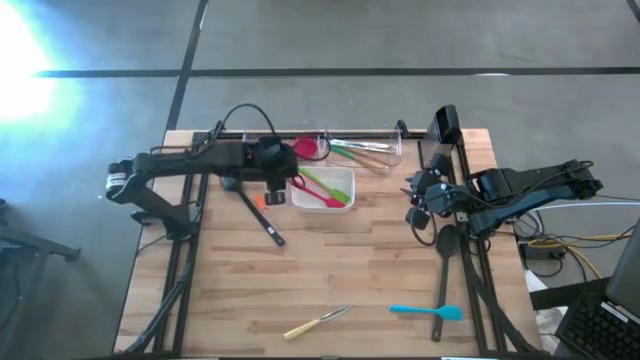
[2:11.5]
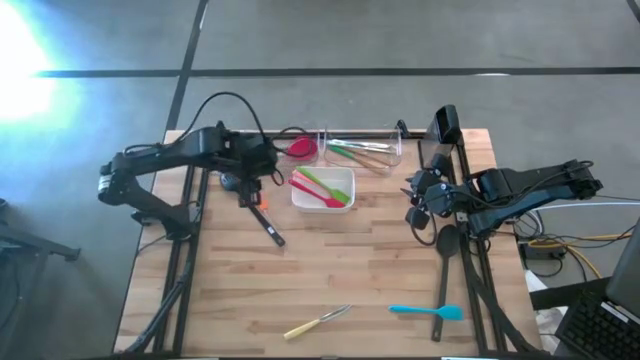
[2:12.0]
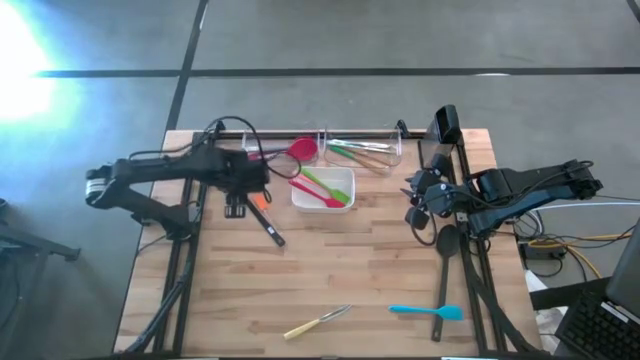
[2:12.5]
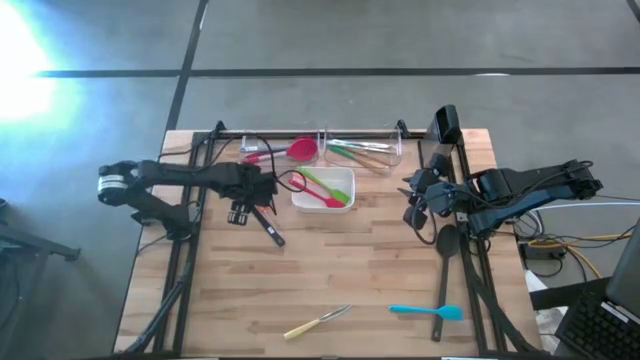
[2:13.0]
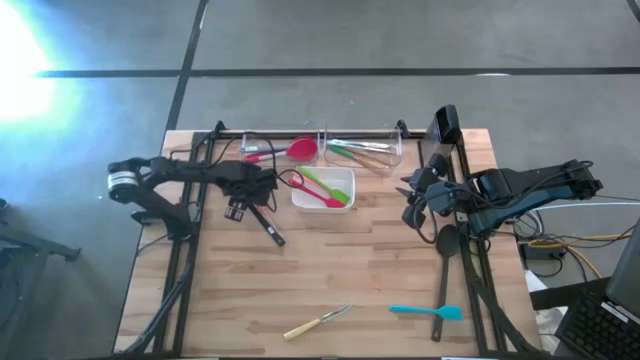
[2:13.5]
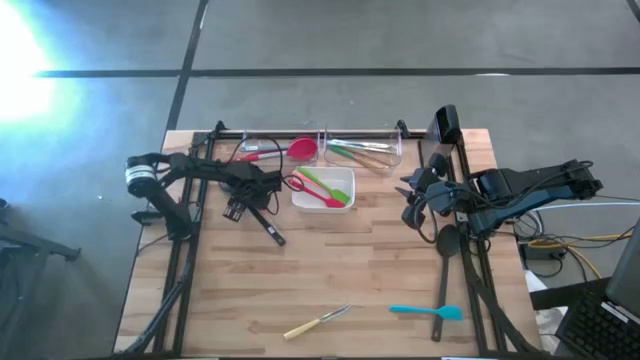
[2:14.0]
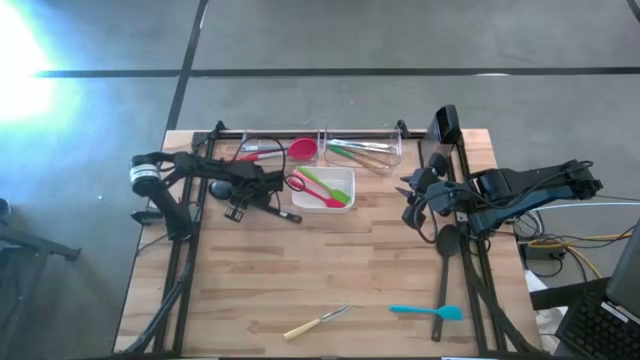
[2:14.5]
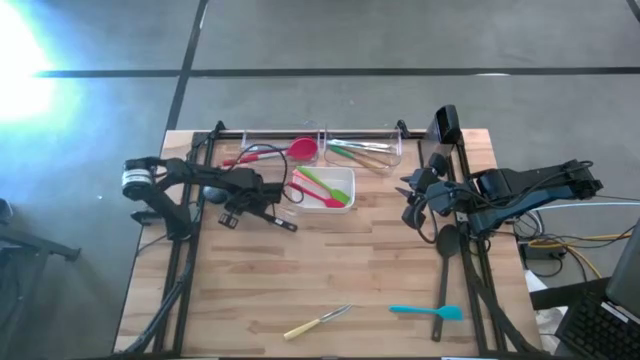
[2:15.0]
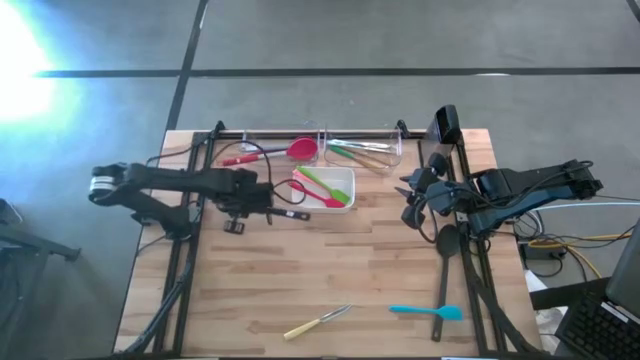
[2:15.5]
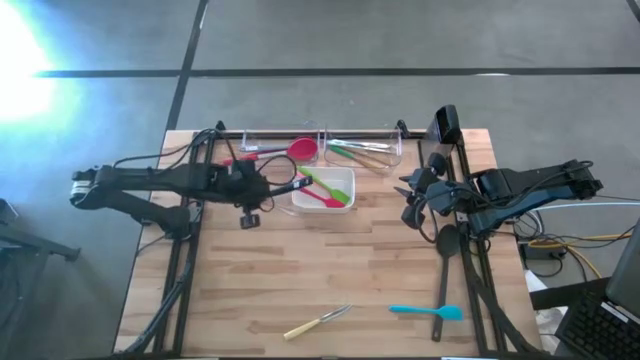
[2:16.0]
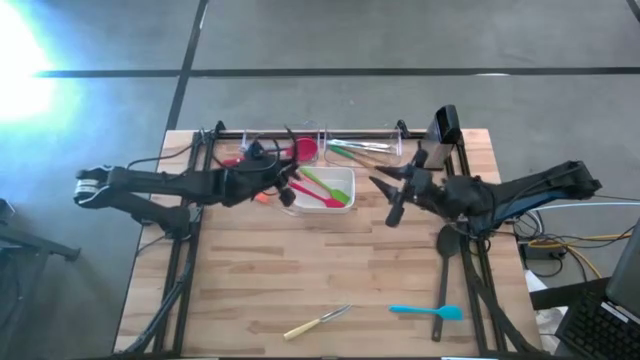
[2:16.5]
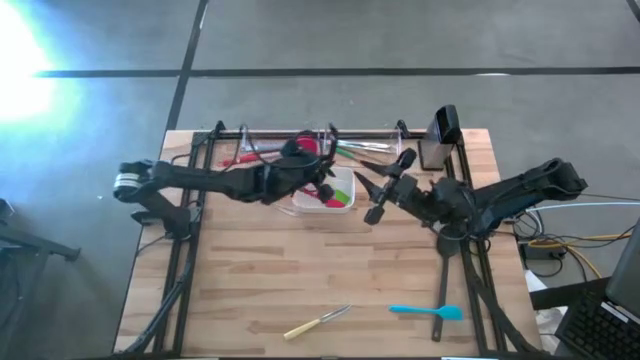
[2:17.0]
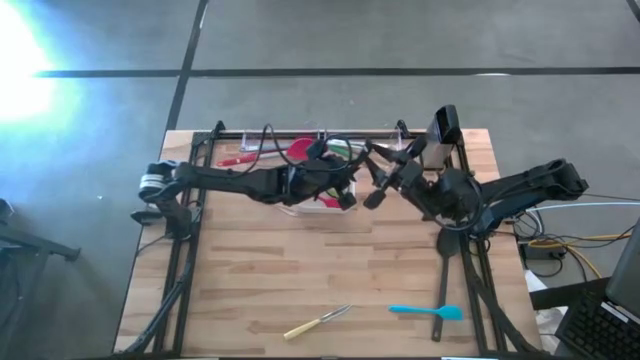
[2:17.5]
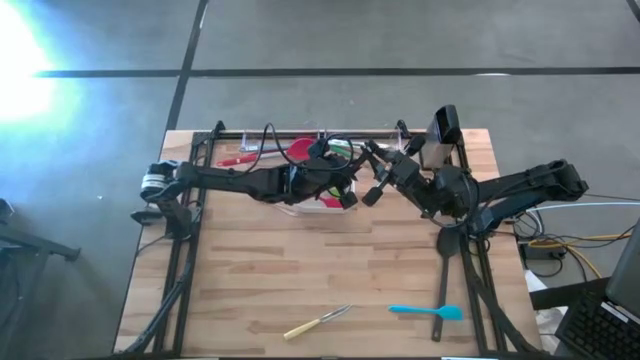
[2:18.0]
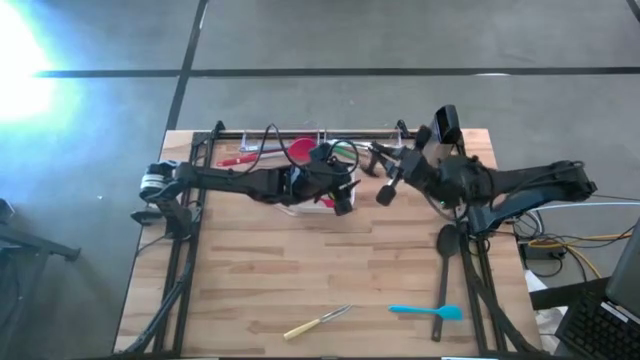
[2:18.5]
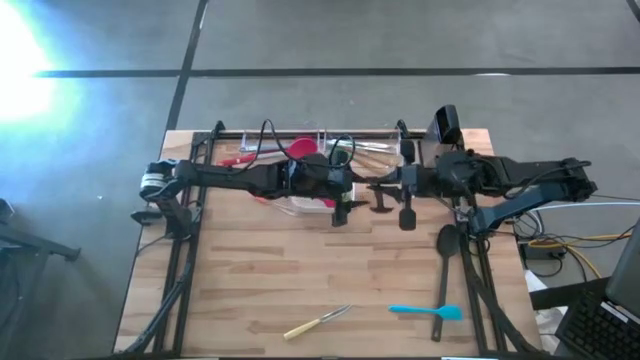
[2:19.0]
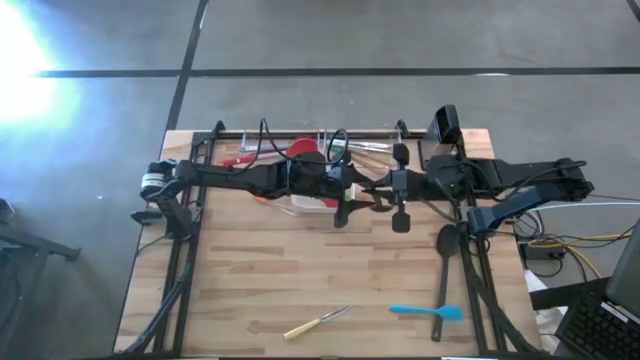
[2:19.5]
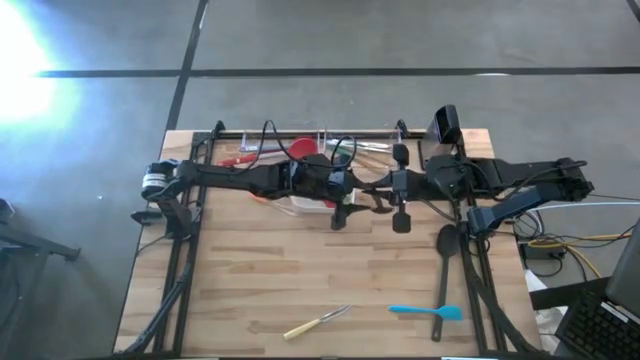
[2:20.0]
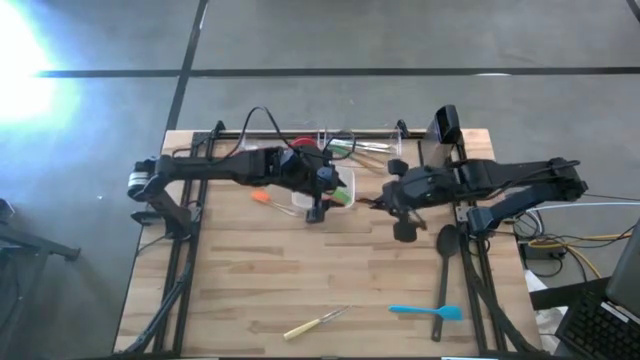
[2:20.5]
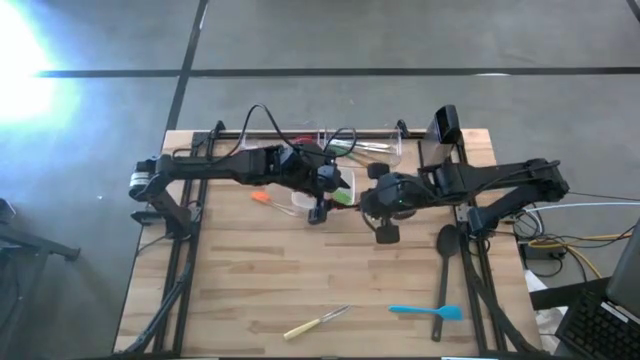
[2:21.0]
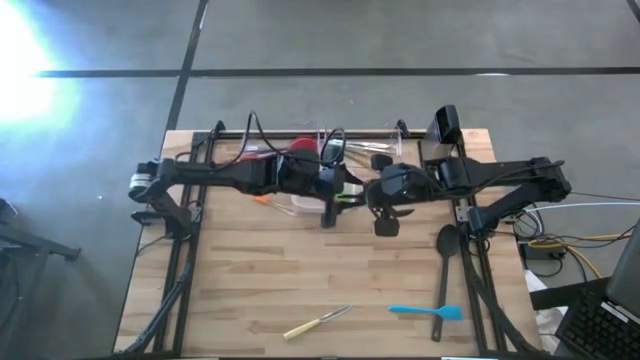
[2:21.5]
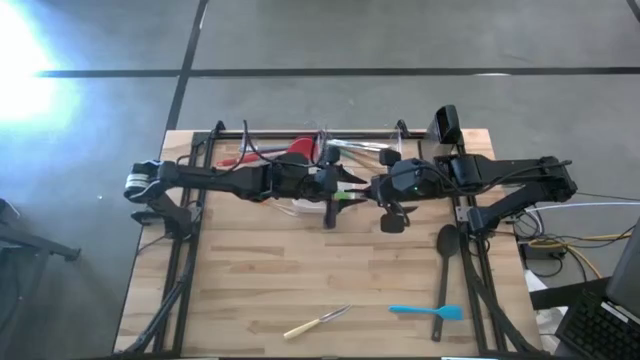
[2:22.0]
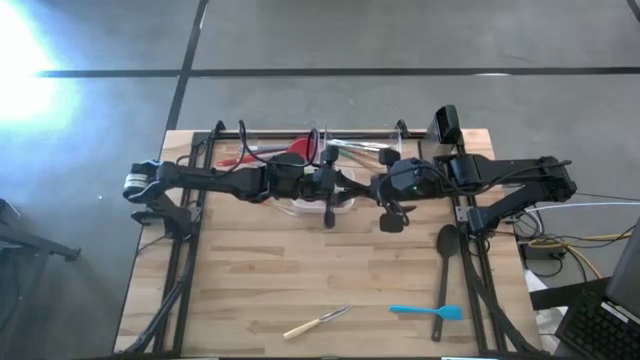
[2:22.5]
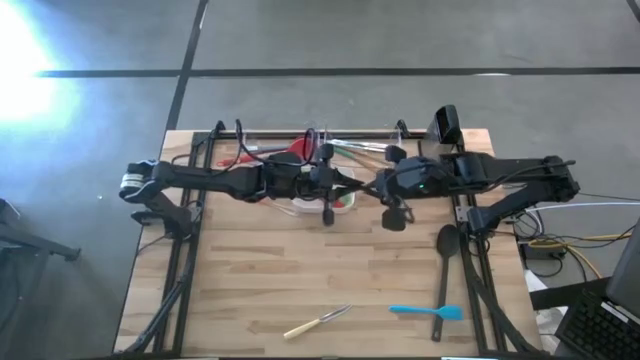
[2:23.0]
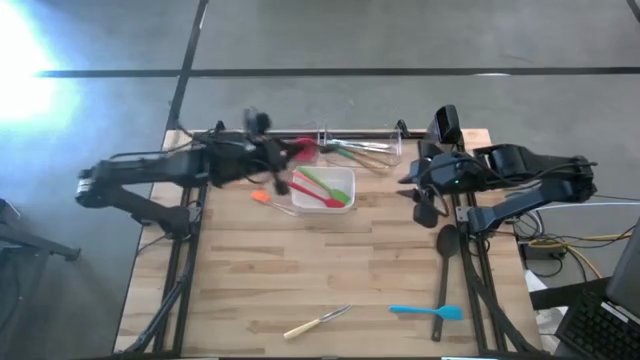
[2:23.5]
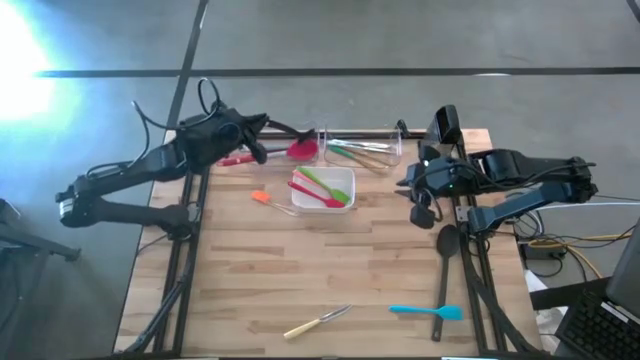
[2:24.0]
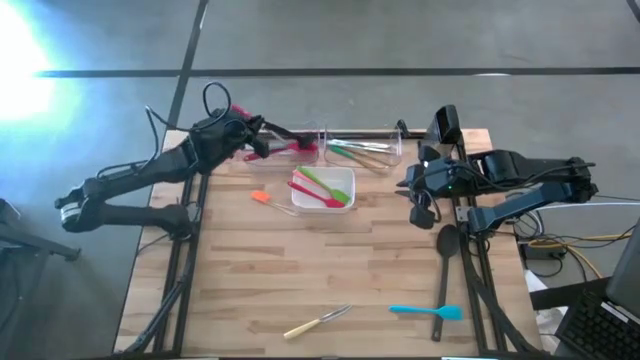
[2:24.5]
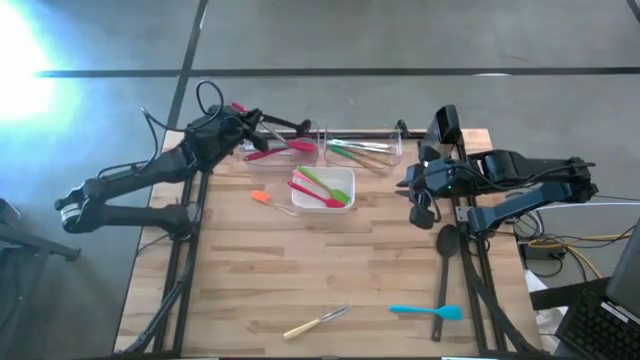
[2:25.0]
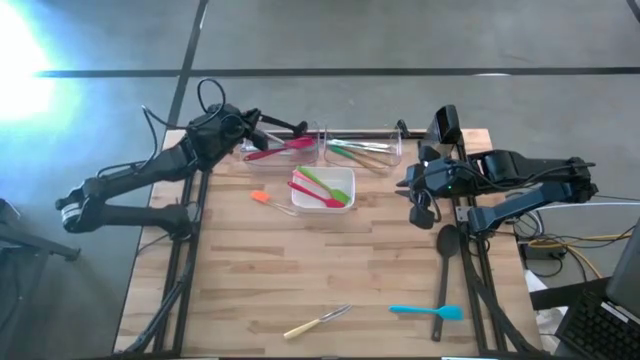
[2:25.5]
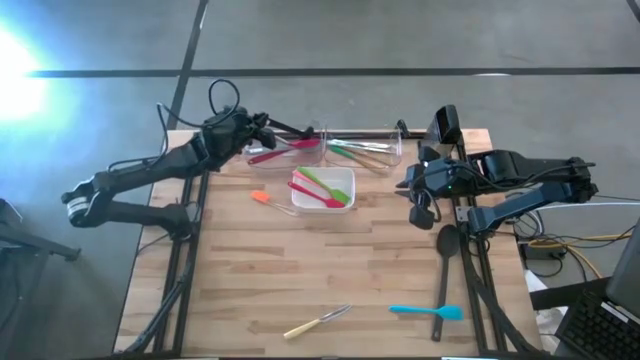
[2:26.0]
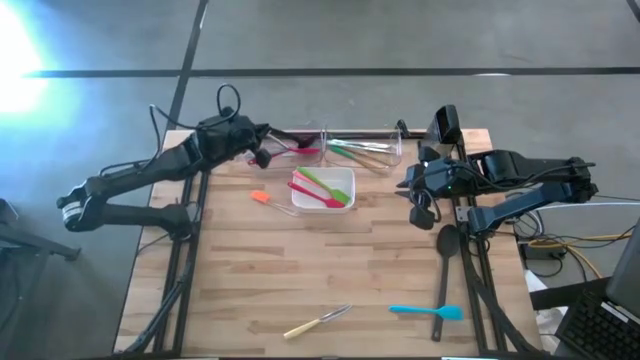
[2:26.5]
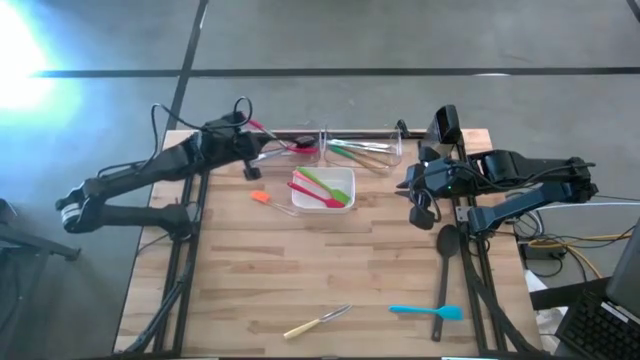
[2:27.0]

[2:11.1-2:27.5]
Task: Pick & Place Kitchen Items
Put the black slotted serving spoon into the left transparent bin

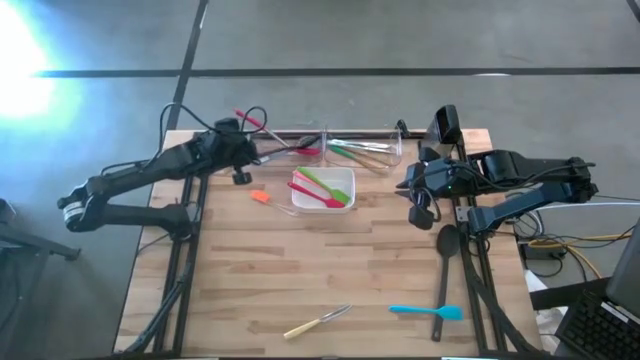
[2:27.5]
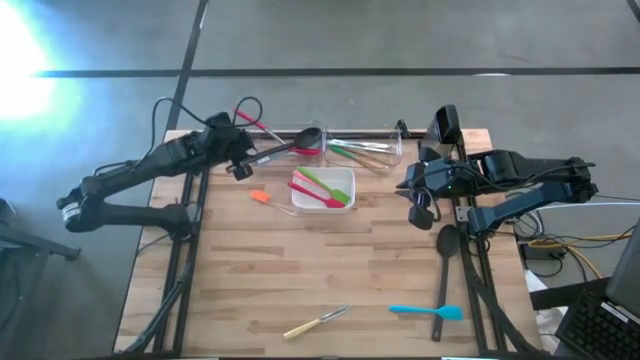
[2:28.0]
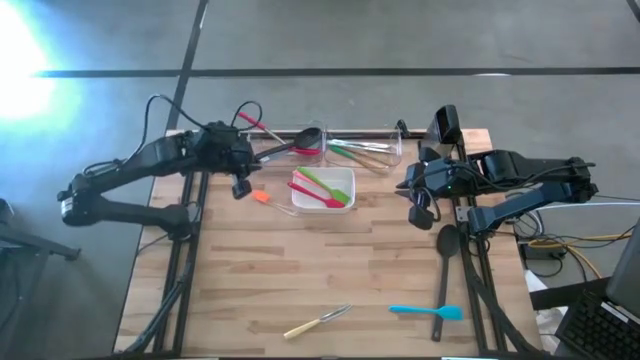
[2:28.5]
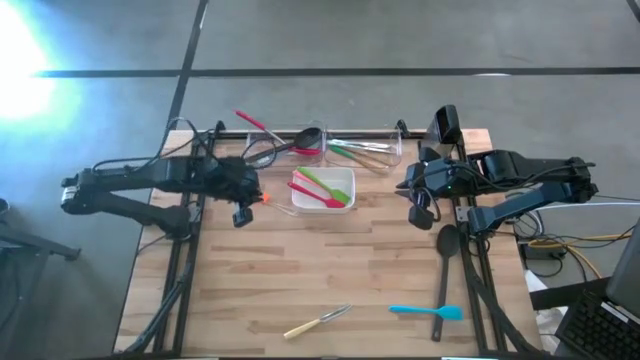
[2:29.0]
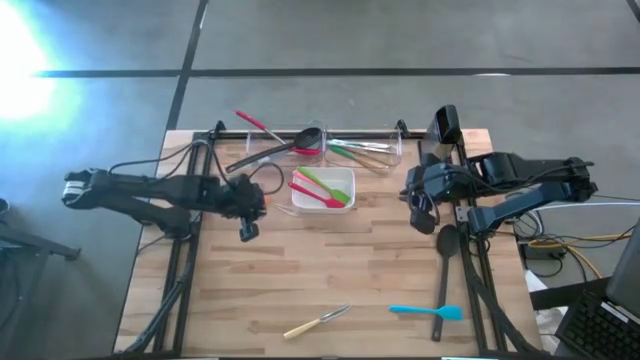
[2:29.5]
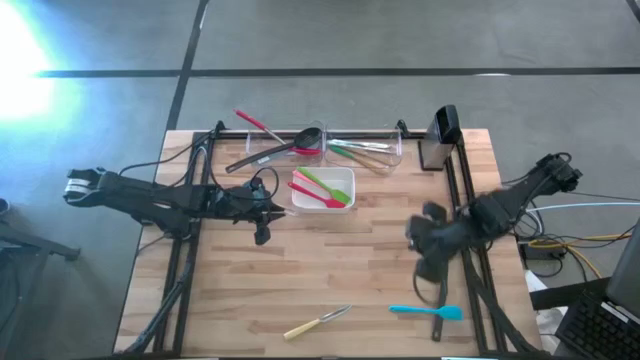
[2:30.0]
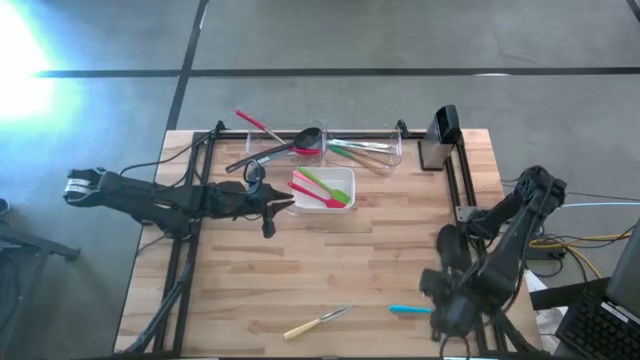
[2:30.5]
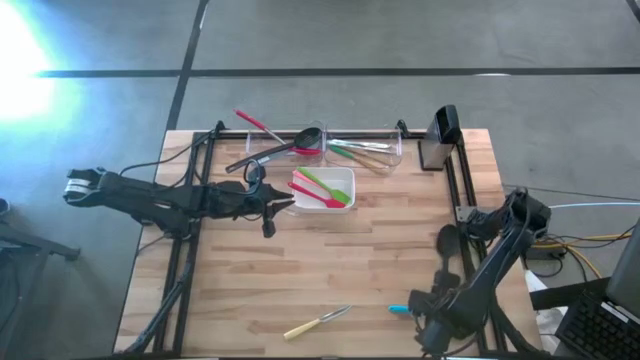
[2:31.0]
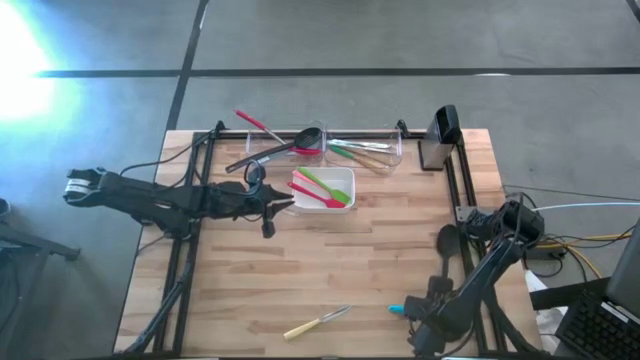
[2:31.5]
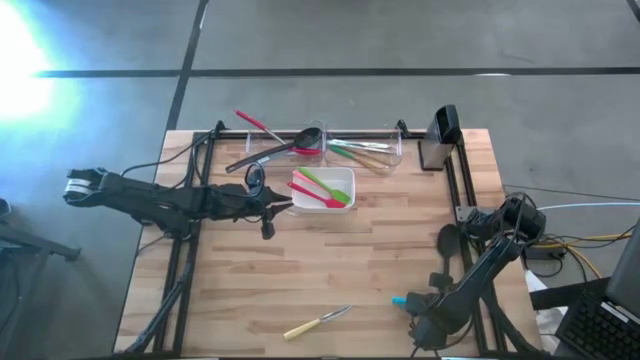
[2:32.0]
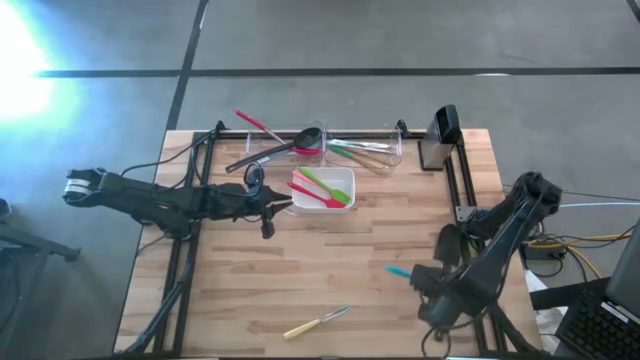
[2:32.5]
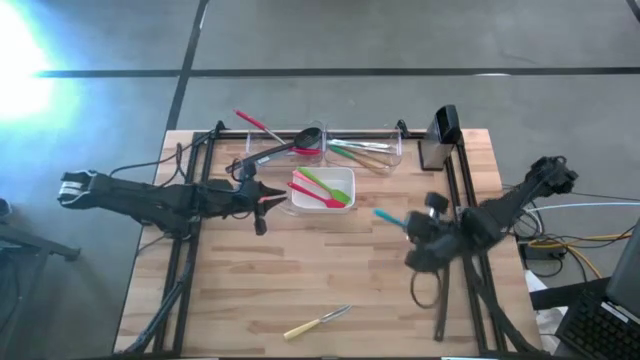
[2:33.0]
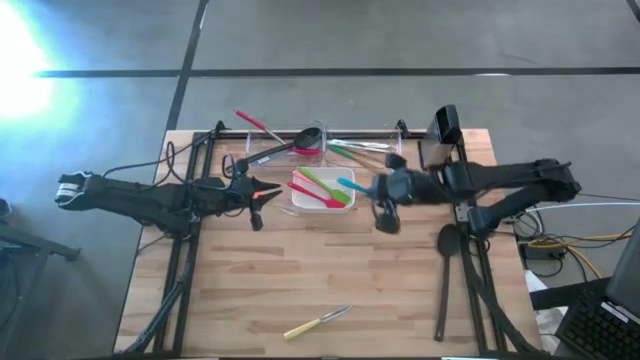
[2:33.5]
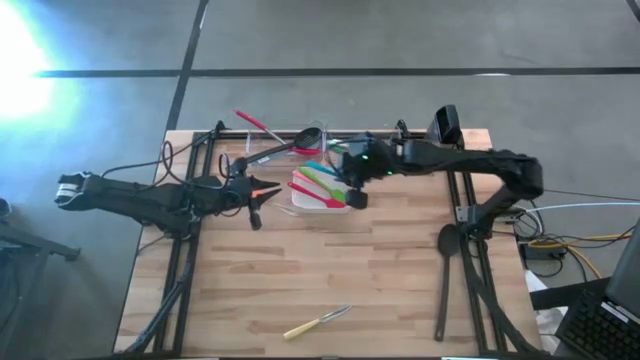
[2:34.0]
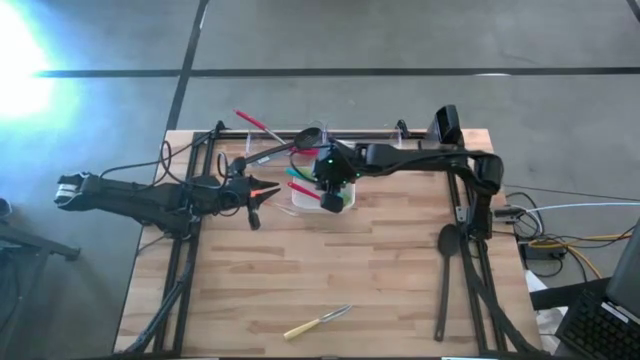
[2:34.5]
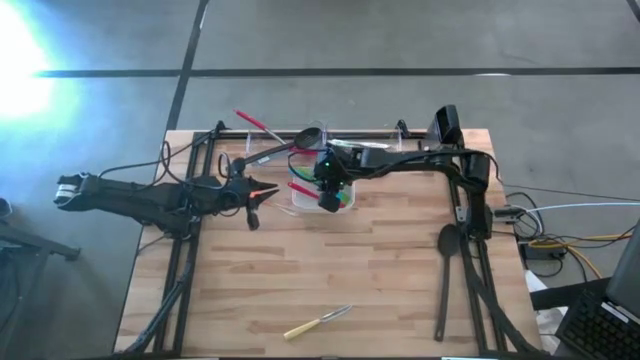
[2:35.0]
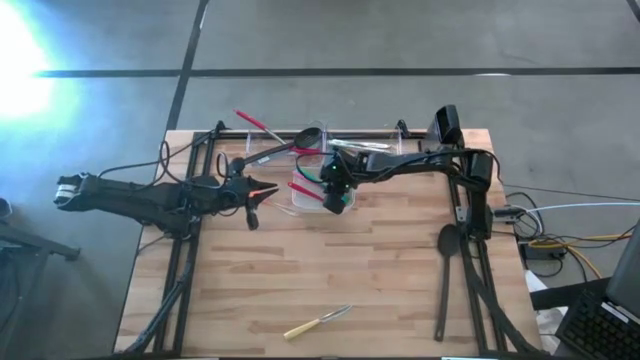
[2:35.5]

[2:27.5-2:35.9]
Put the blue spatula into the white bin
